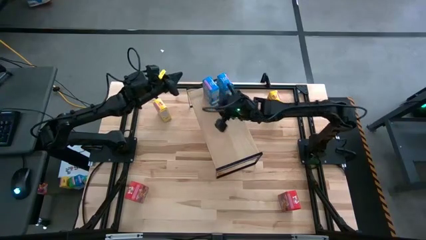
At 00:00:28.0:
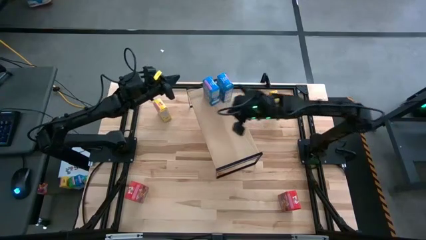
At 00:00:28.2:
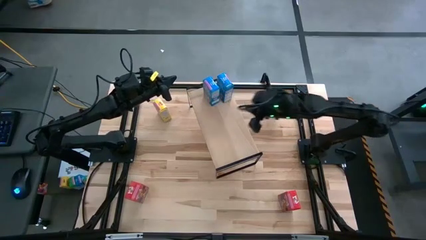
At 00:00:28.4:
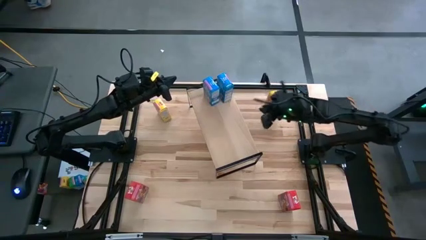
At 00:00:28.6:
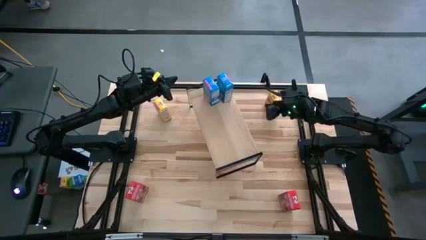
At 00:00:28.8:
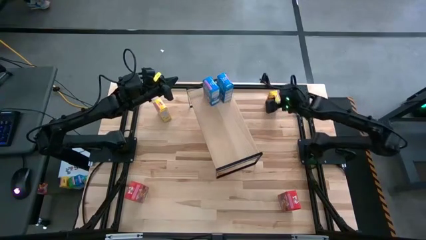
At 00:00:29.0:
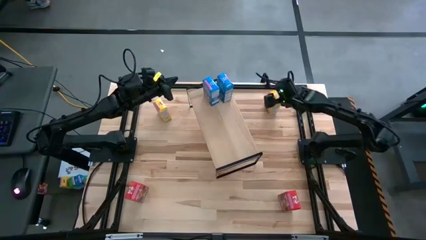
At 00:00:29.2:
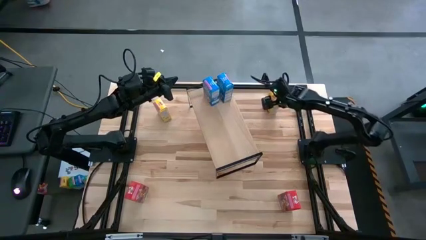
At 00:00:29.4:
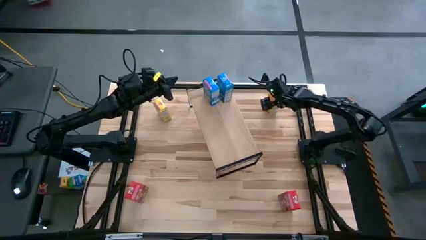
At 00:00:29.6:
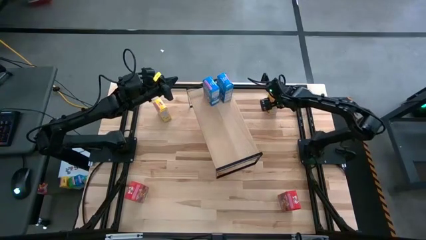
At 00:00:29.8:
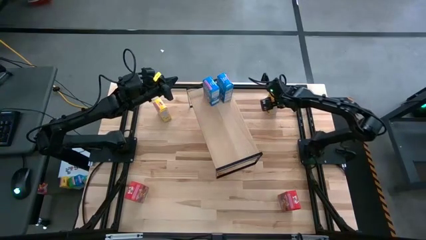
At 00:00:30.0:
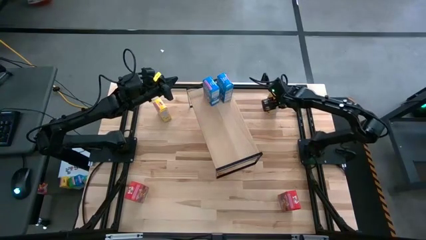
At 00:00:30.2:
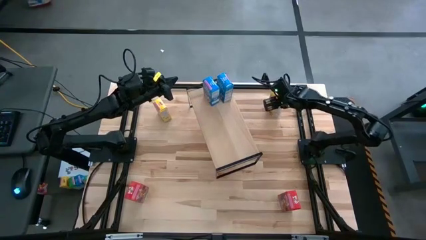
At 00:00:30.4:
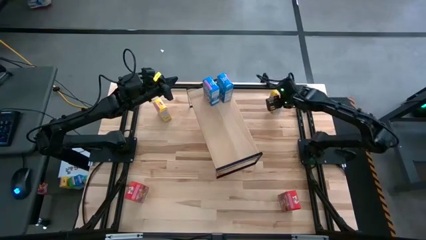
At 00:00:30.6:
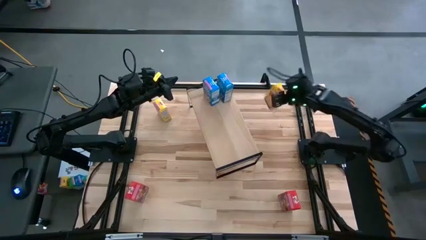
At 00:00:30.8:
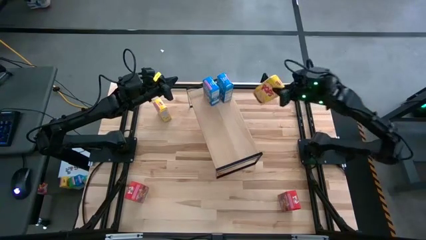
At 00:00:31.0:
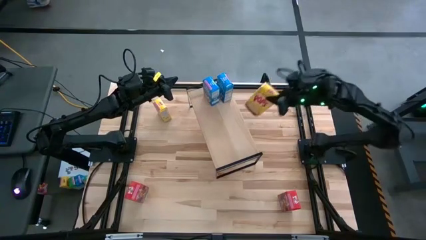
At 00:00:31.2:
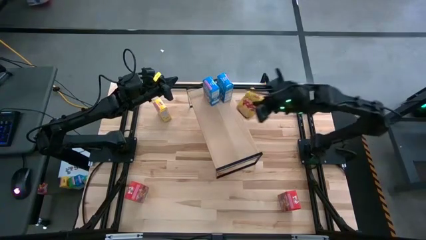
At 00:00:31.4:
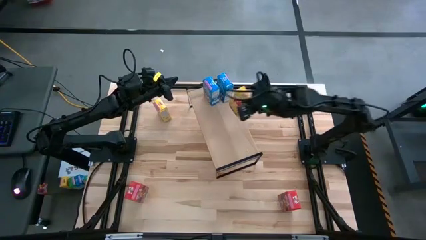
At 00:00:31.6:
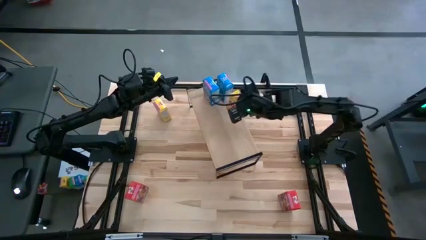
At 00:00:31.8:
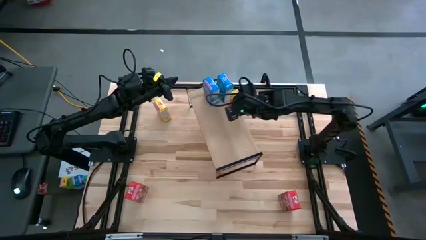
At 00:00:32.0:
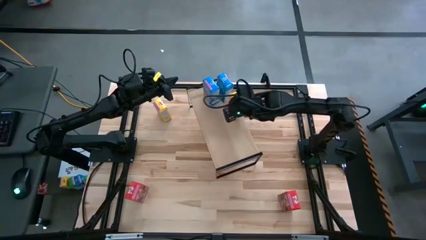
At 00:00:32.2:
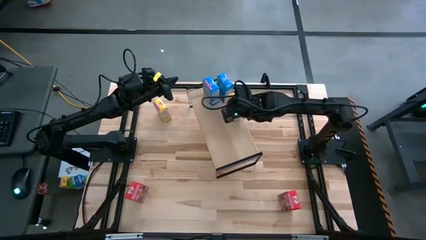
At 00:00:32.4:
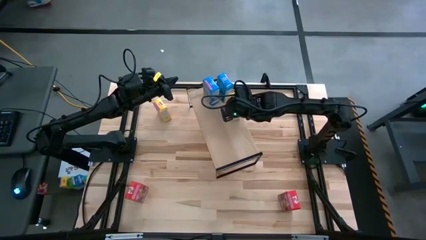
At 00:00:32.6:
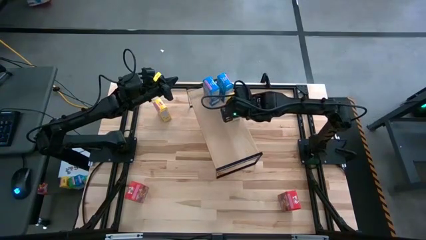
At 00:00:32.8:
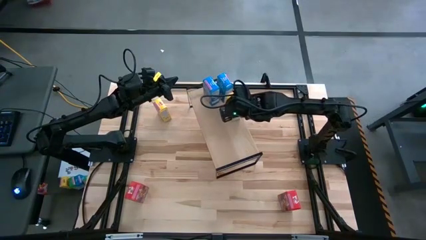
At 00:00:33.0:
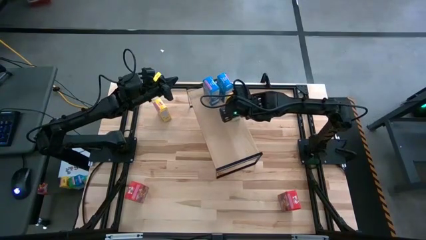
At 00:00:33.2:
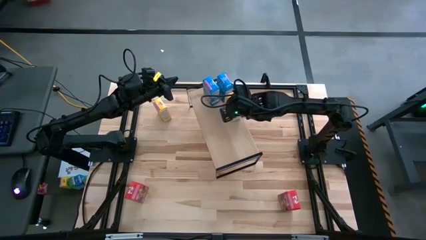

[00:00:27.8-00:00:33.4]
Task: Stack cereal on shelf
Put the right yellow cereal box on the shelf

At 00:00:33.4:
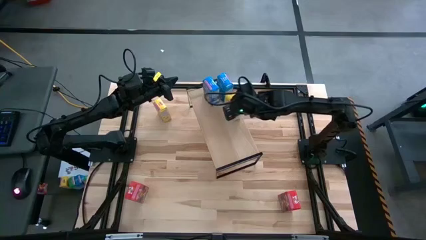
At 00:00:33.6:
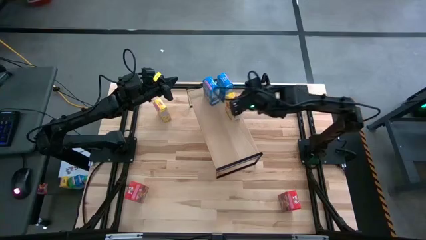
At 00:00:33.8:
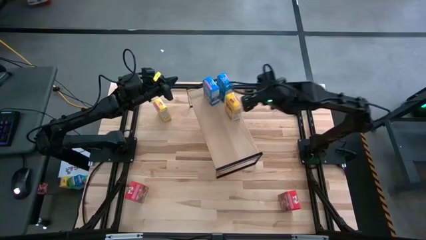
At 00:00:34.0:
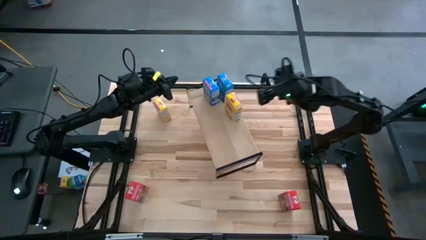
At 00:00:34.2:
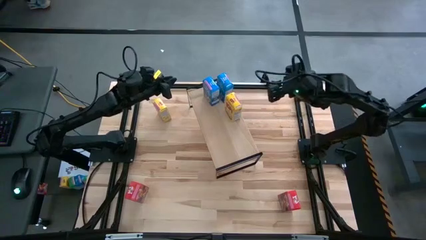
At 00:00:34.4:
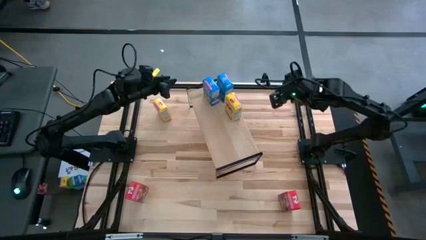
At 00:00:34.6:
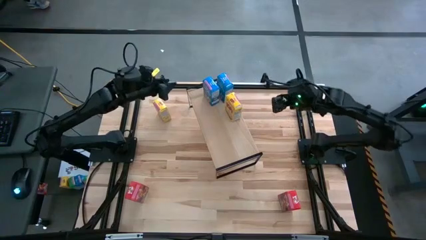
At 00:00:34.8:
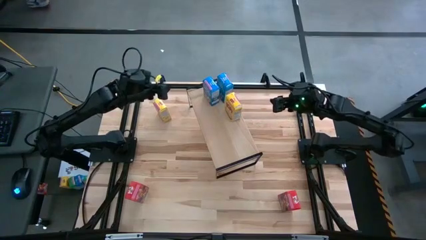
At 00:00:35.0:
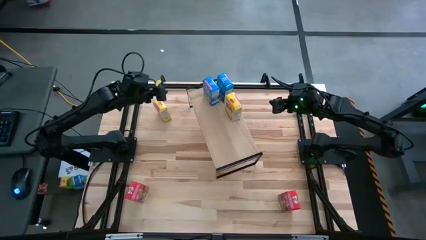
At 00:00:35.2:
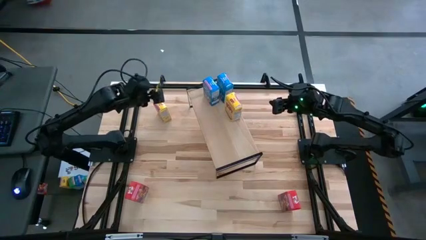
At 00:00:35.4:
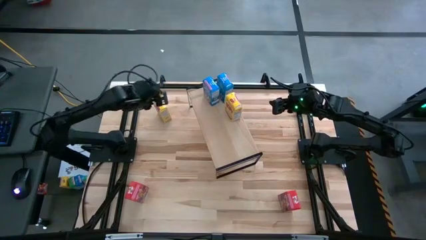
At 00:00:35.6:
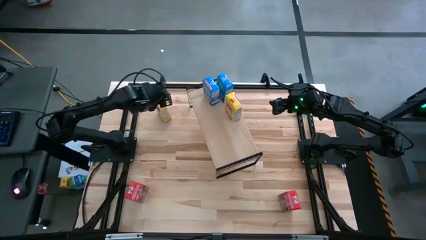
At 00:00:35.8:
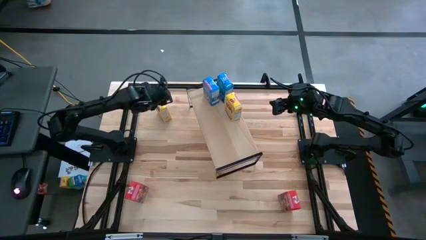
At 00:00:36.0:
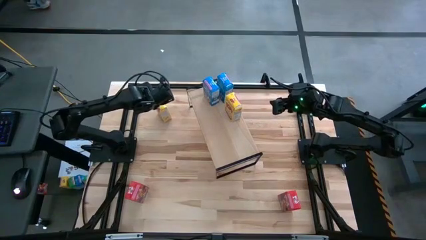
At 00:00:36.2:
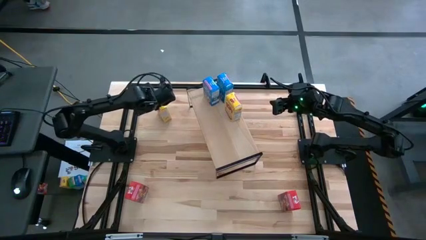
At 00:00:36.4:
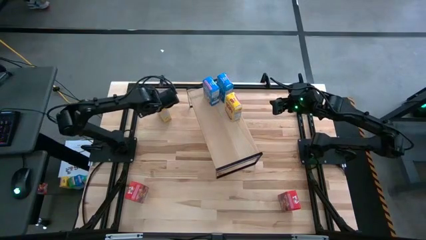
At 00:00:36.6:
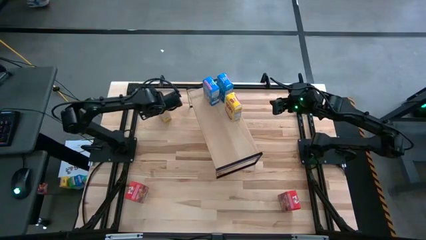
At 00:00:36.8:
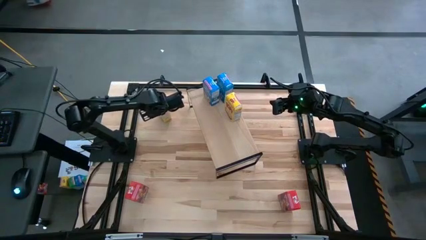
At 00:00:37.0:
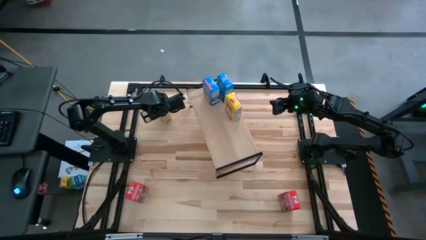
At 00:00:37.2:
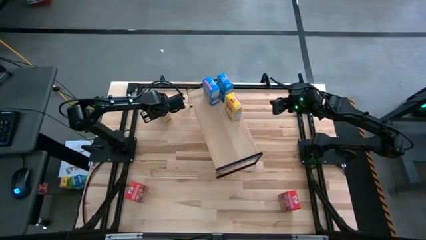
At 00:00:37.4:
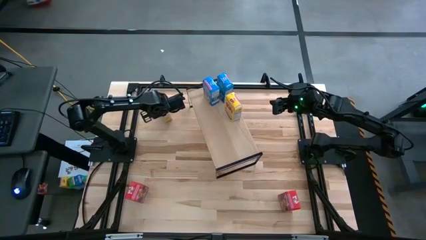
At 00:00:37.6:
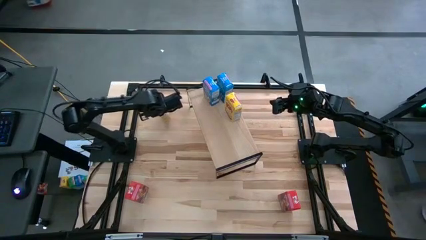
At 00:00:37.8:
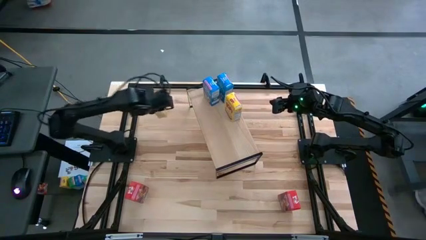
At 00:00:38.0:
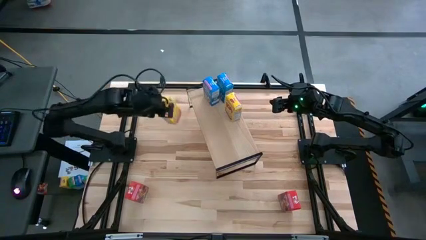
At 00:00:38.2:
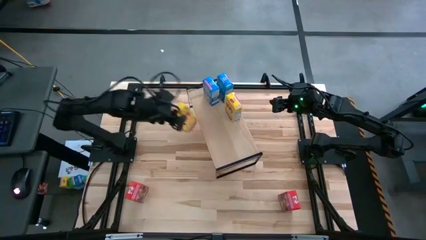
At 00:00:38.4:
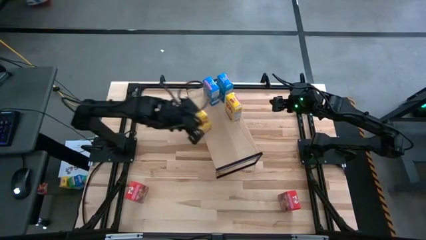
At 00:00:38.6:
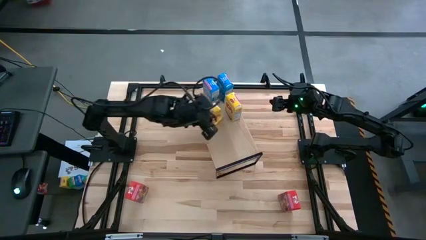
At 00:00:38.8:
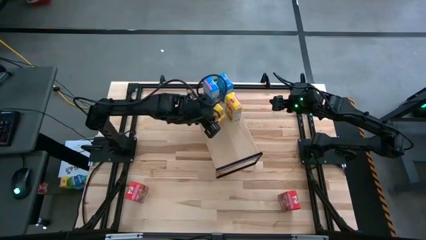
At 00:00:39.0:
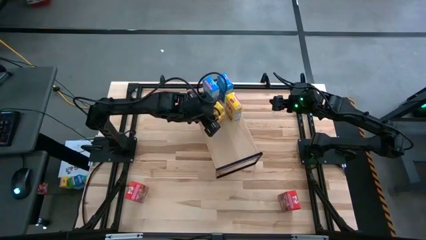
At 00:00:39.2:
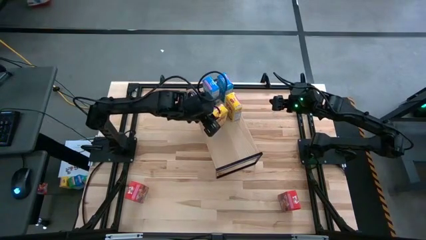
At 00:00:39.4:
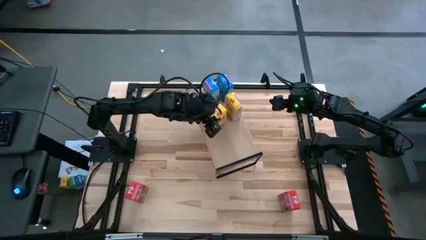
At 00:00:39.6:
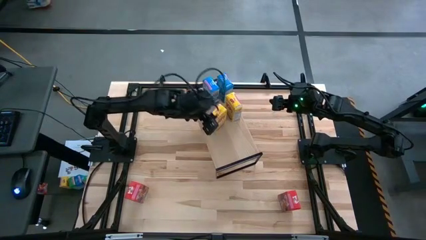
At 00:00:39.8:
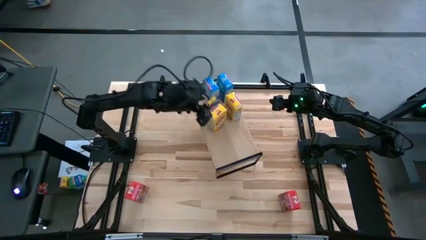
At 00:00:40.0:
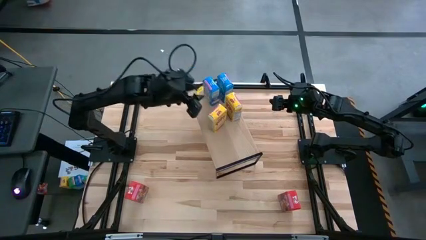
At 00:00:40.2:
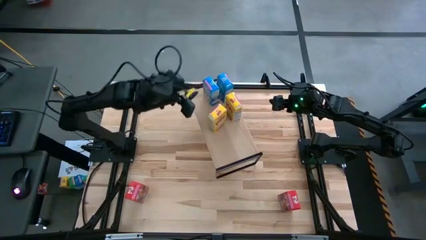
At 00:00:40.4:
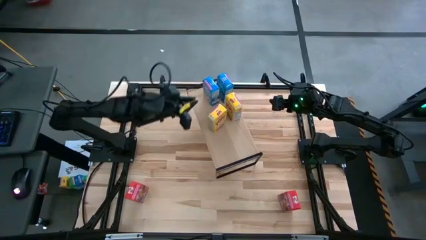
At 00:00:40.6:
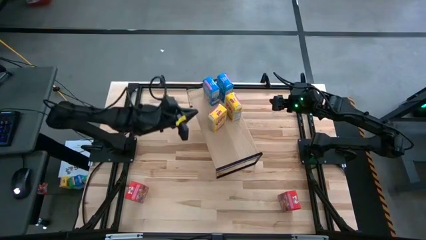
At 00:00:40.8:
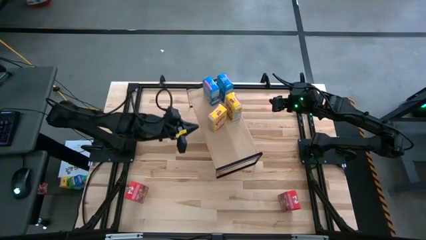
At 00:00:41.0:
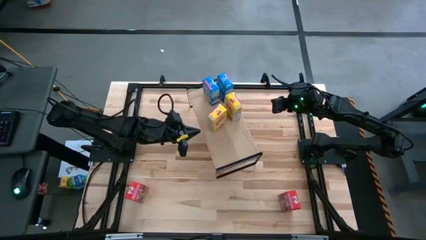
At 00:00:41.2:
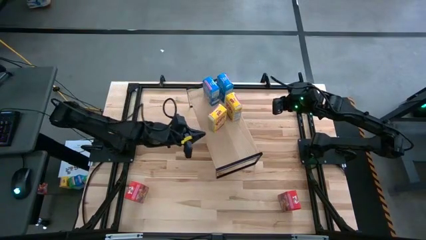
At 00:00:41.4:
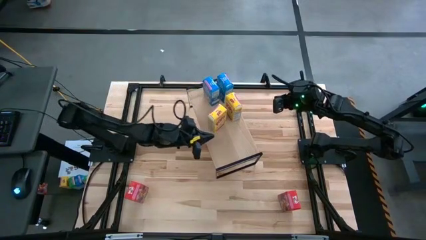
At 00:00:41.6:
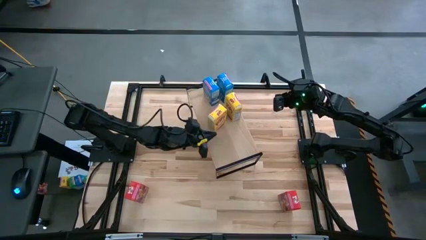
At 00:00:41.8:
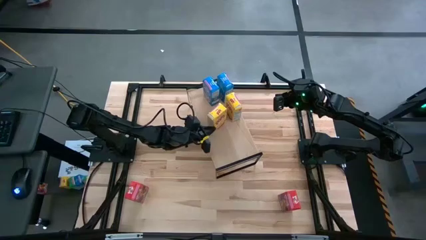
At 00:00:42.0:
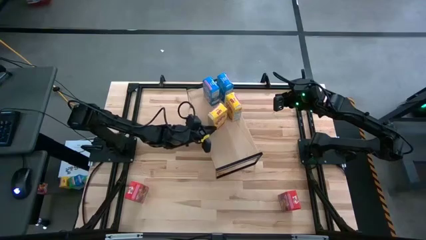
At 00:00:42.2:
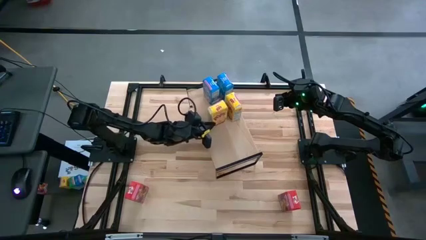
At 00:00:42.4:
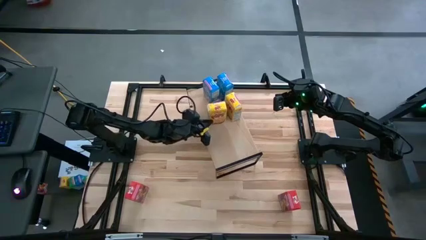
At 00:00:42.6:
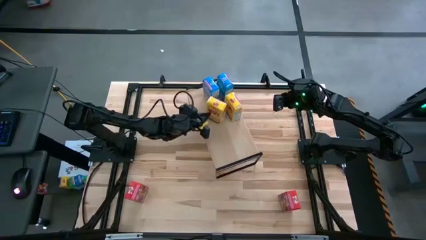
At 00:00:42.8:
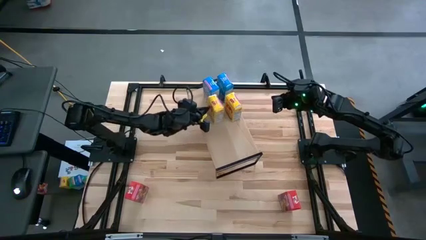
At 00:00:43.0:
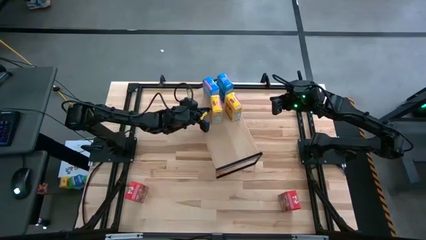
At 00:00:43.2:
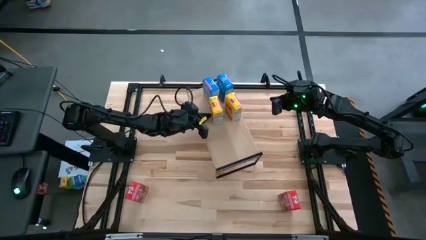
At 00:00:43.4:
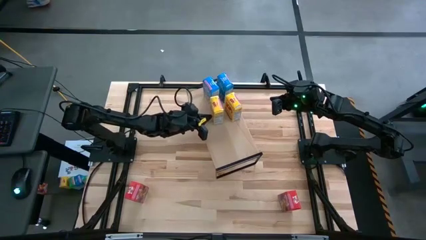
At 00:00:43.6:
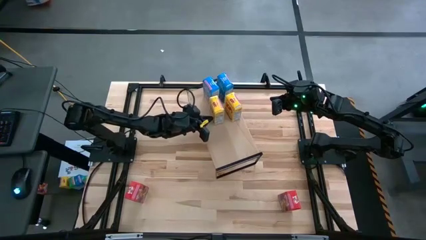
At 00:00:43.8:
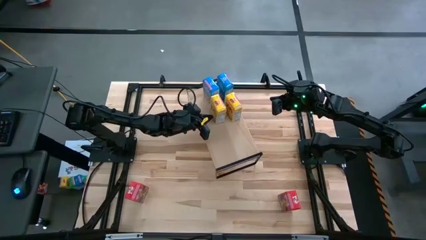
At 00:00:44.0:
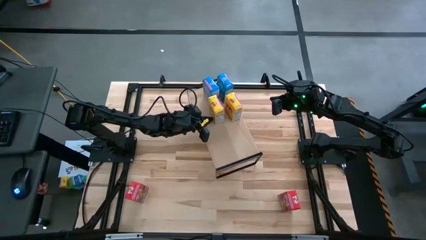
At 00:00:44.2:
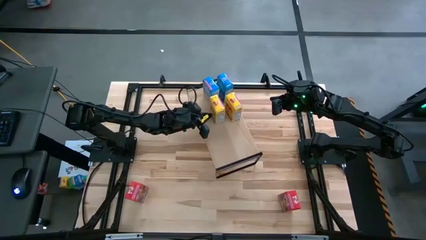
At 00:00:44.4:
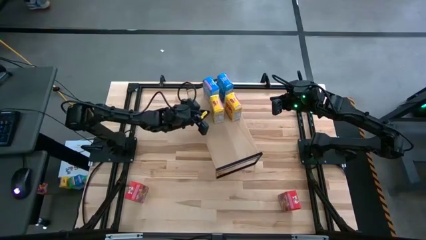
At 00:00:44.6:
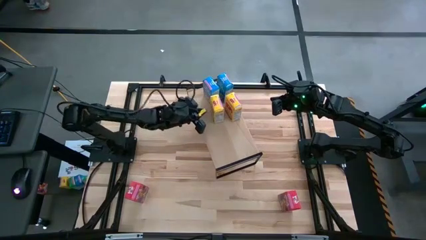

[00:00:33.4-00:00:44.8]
Put the yellow cereal box on the shelf aligned with the other yellow cereal box
